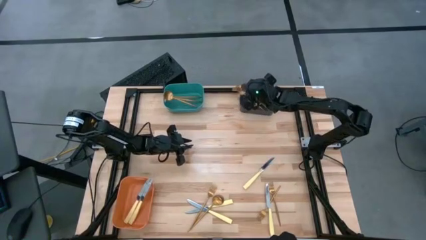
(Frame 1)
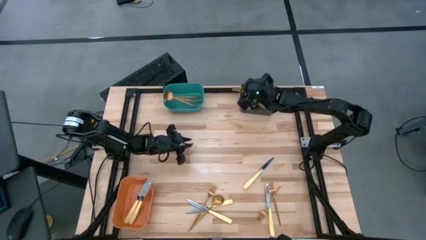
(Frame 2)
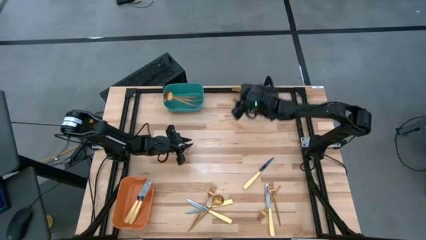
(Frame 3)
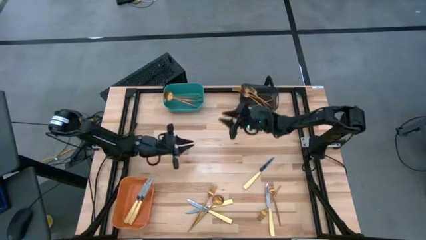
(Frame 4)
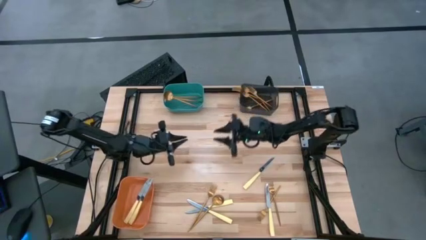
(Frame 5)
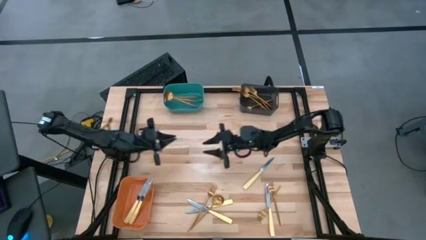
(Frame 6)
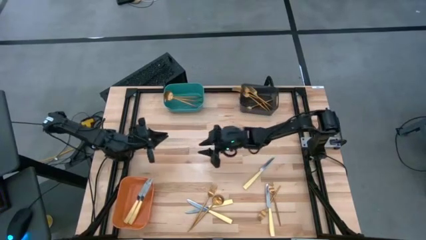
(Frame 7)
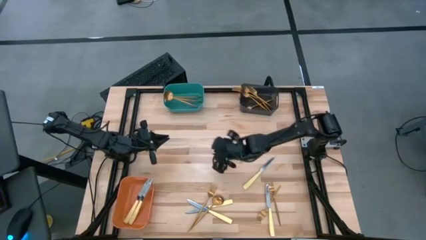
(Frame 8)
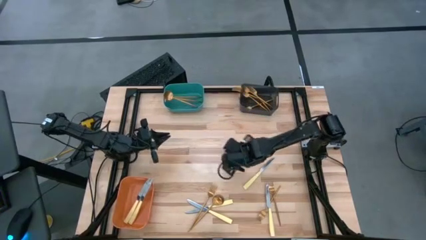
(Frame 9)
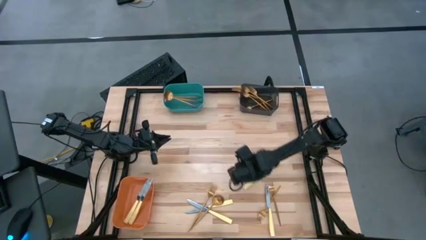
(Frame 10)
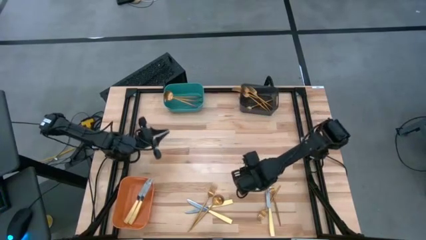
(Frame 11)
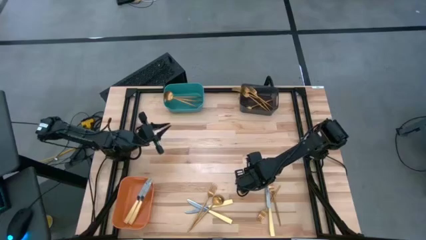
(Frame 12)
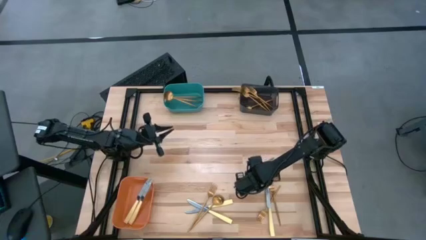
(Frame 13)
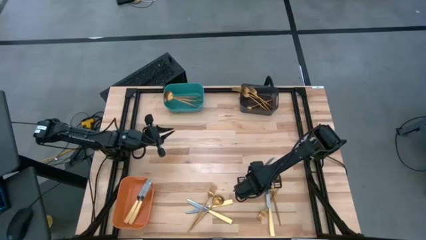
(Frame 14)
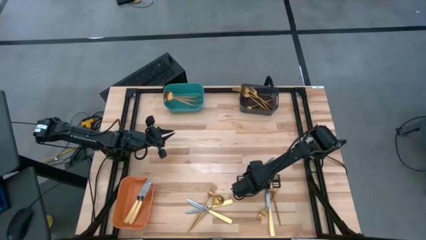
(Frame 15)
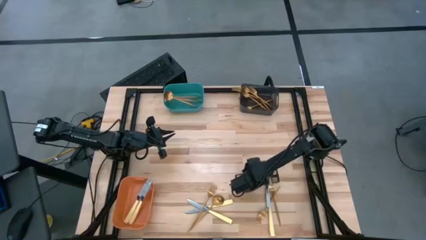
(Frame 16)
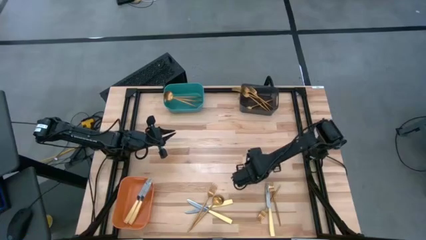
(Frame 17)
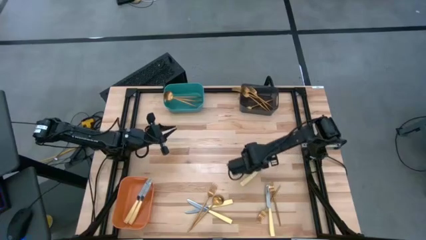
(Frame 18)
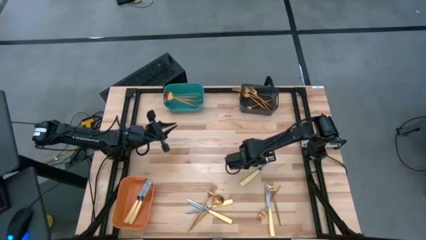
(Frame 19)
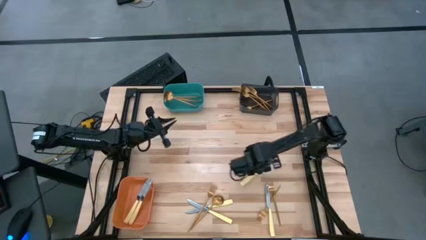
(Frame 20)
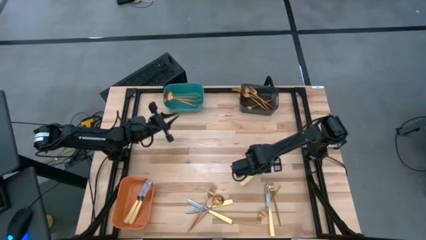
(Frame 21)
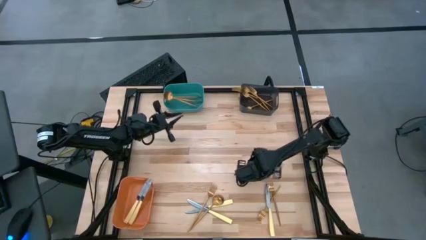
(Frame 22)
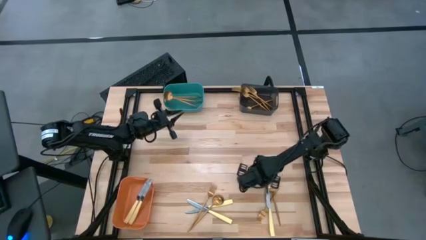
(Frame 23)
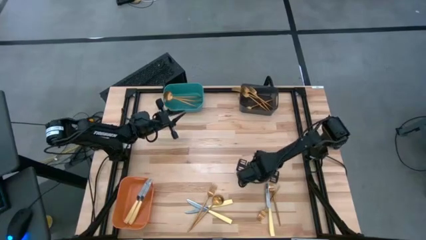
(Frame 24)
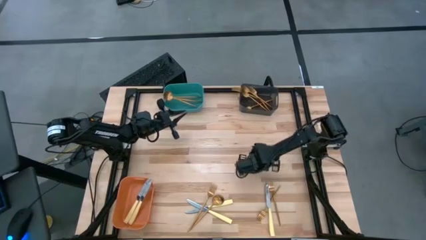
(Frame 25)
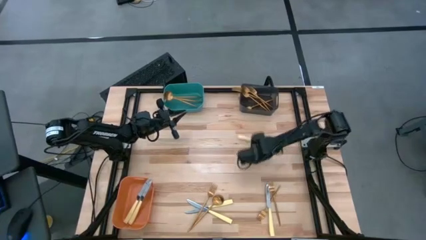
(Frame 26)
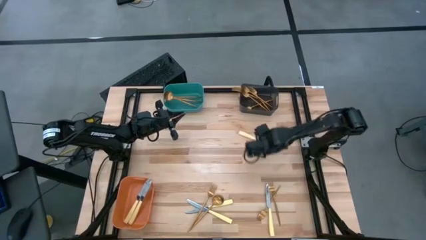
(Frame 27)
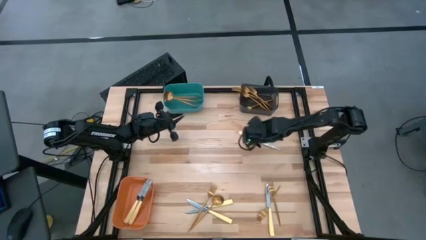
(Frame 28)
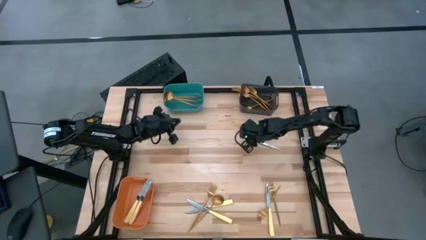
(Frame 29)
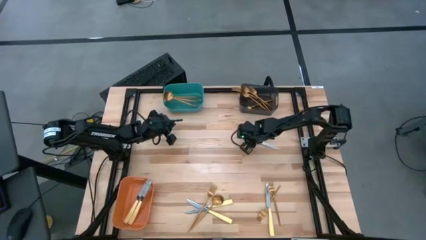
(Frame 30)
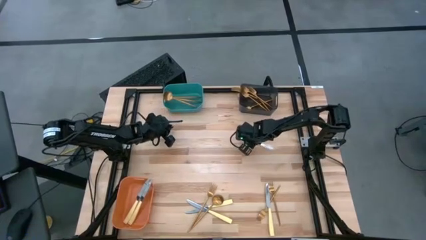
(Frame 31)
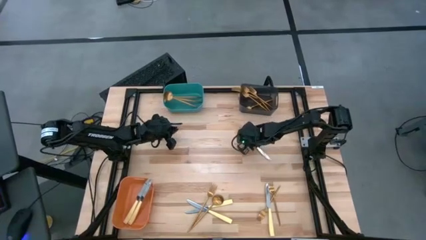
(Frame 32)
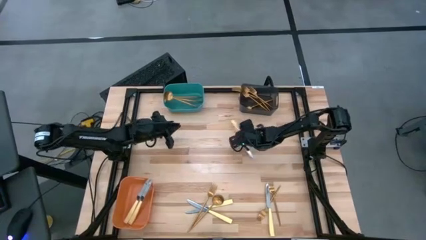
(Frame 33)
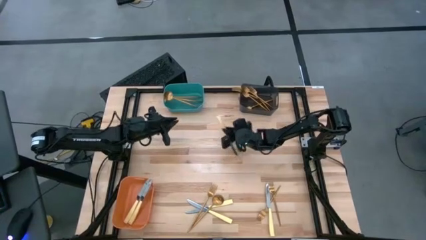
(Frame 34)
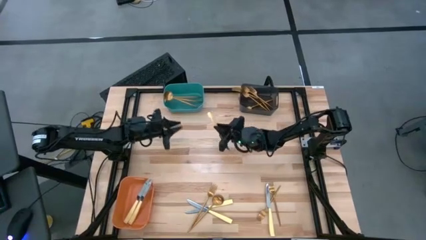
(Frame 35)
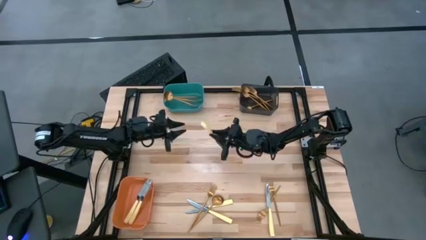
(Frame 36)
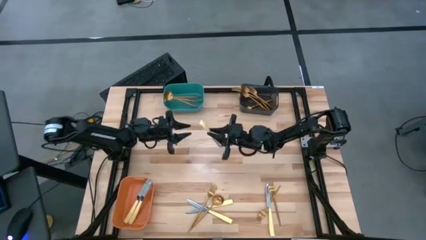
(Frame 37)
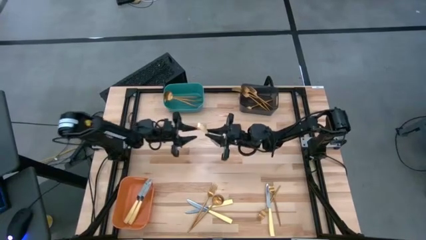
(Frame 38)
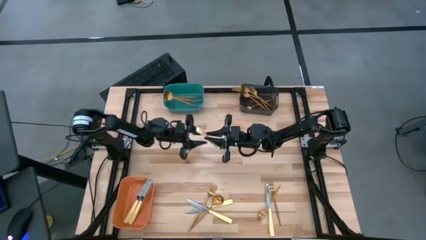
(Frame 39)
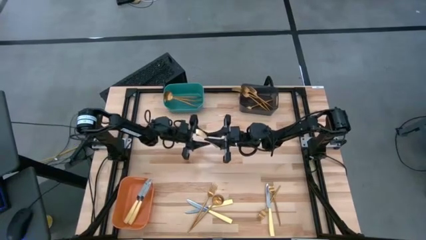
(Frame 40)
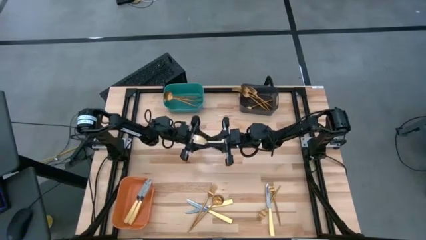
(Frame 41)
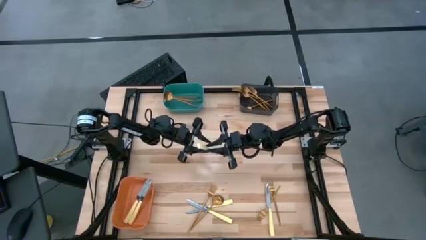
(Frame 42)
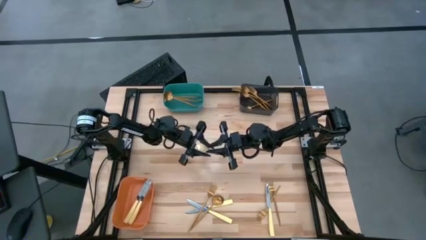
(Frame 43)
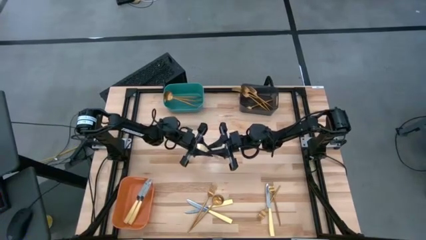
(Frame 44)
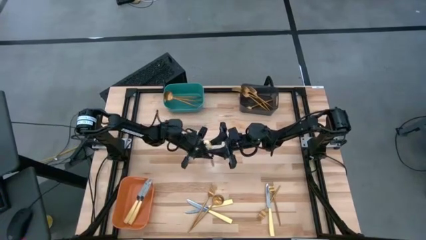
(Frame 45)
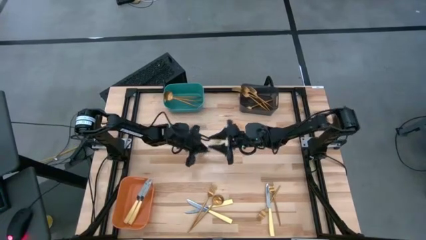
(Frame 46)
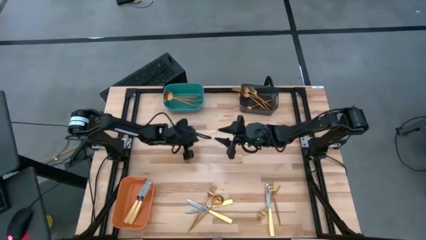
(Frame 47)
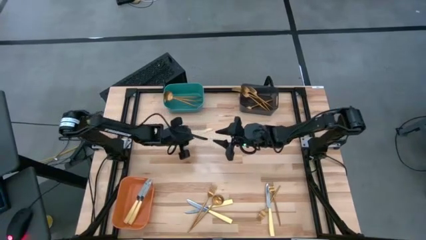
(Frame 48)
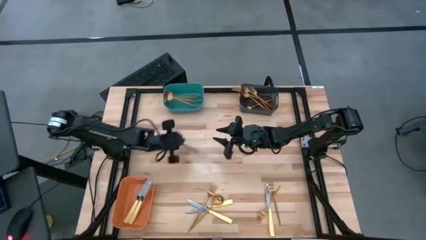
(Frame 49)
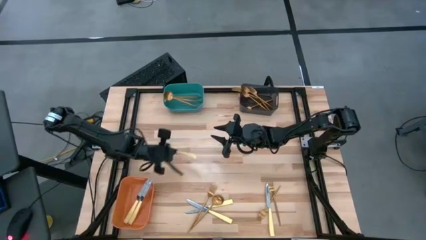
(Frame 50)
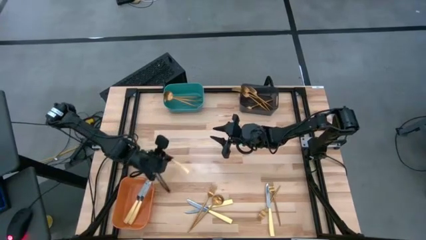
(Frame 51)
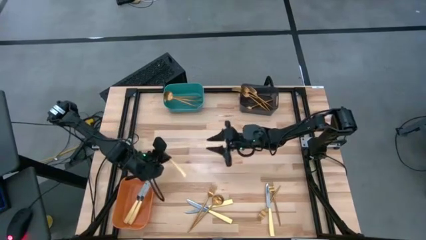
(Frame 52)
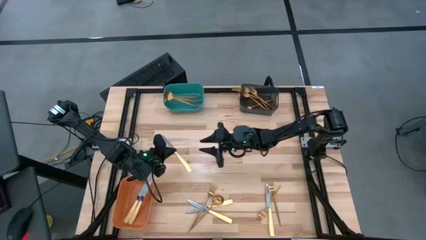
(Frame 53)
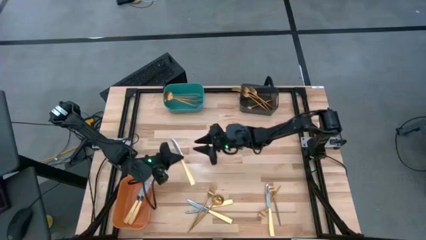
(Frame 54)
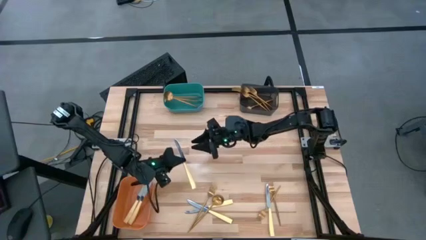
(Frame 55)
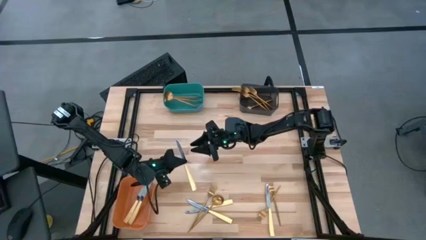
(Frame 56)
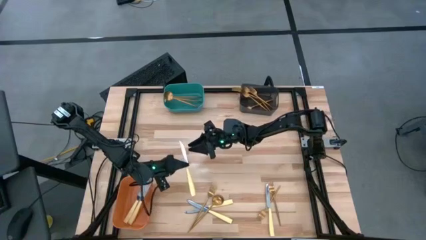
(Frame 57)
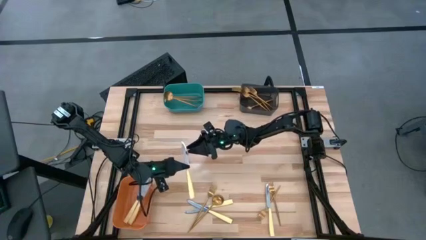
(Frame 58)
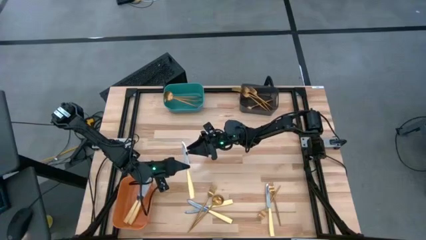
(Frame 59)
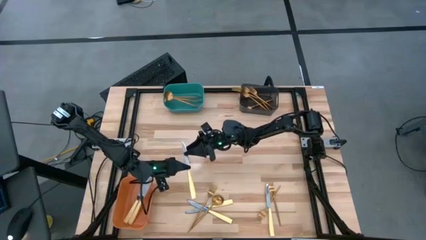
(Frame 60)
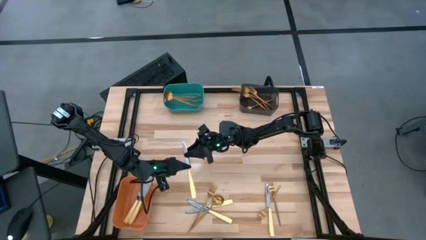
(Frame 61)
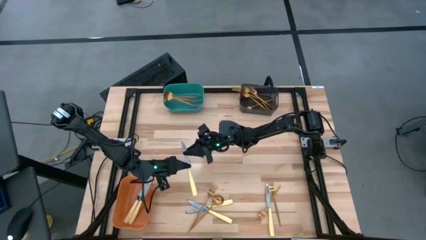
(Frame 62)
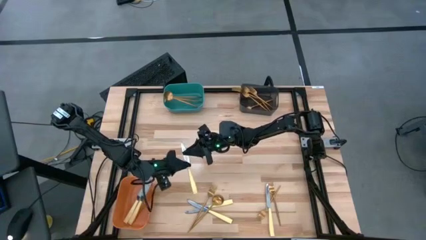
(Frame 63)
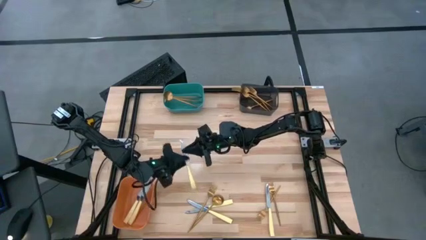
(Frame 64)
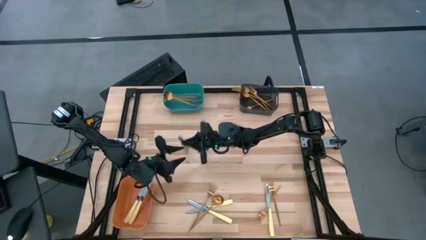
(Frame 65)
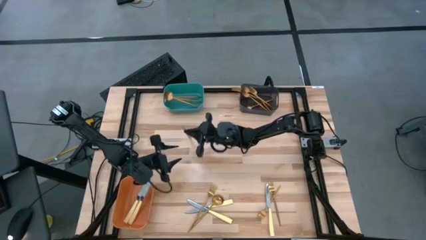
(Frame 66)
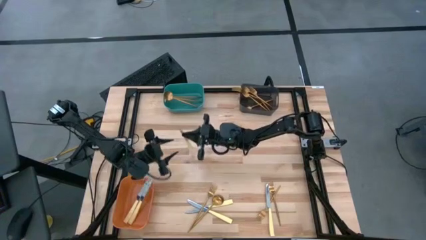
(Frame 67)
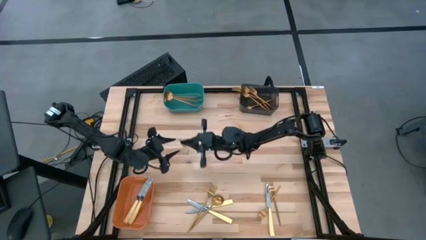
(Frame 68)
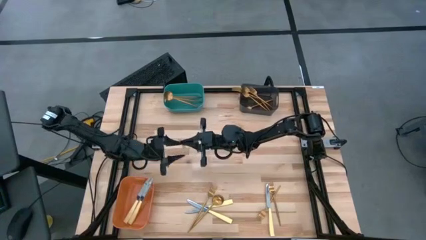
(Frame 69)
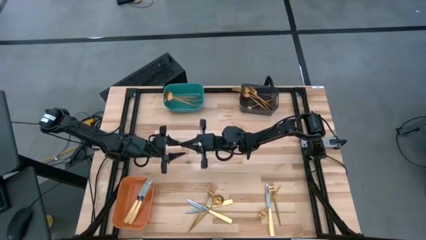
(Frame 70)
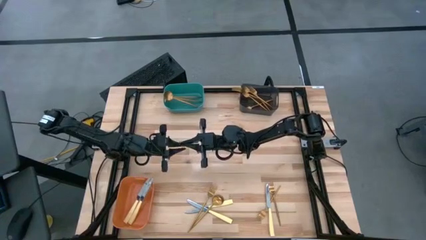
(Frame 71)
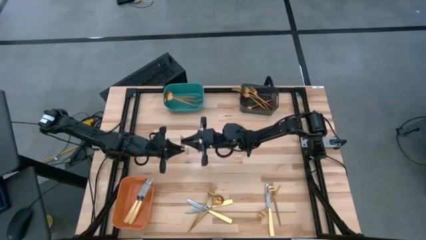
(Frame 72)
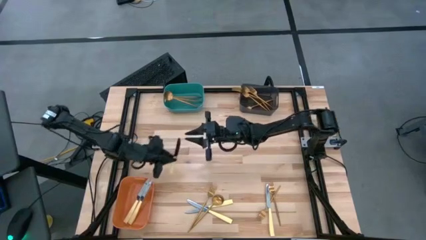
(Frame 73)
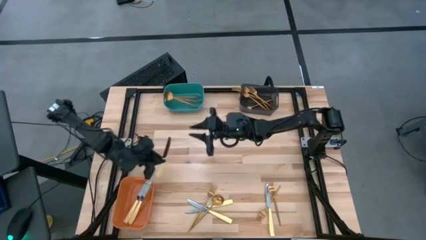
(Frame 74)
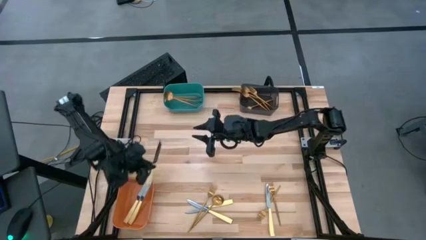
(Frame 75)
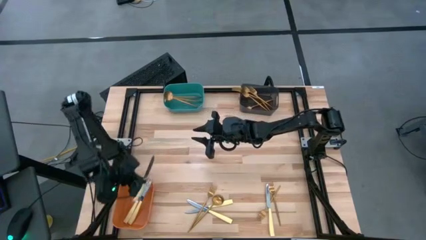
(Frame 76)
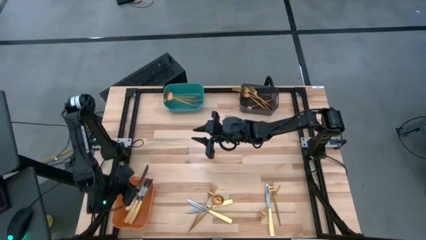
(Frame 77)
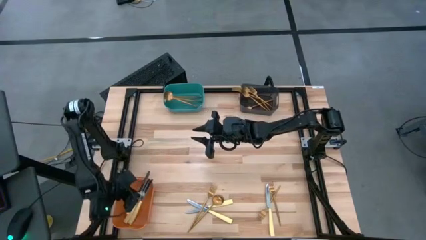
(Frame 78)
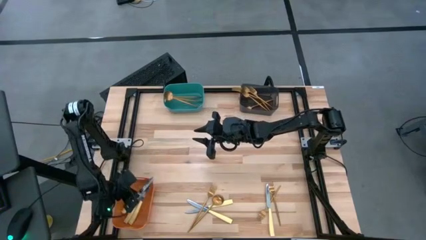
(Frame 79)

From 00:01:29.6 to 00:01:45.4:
Task: Sort silverware by color (type)
Put the yellow table knife into the orange bin
